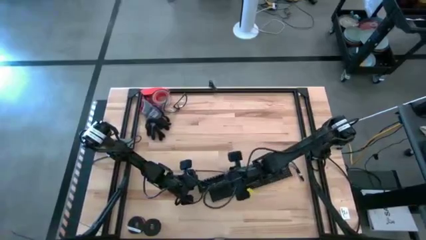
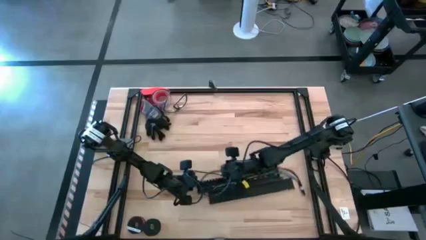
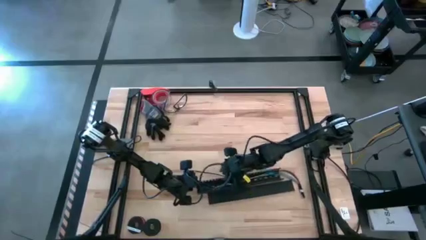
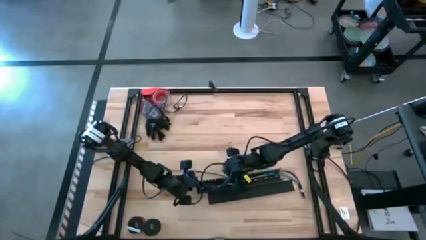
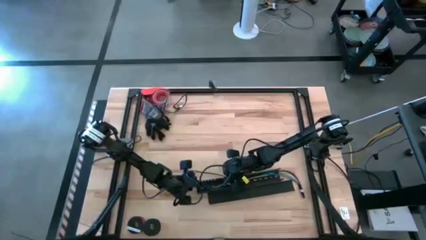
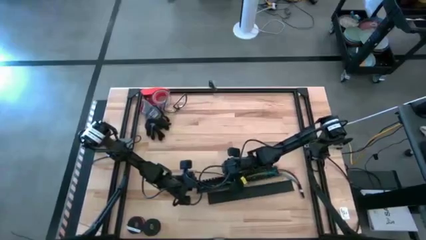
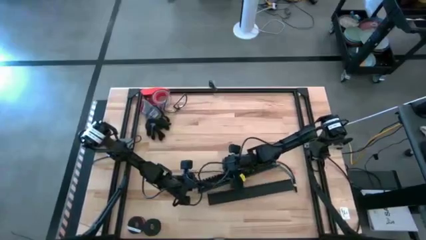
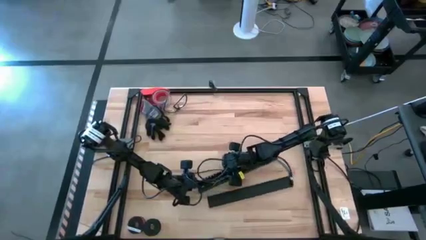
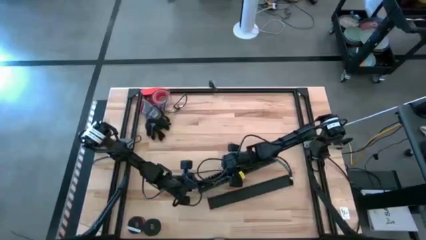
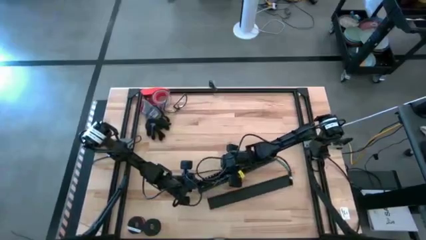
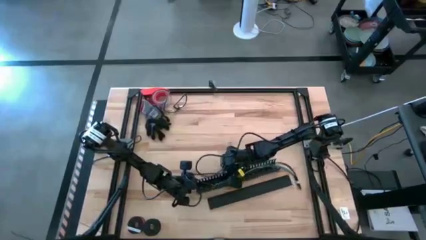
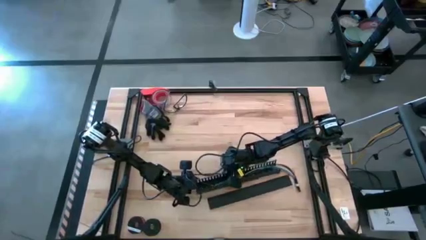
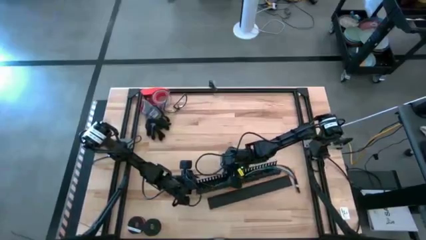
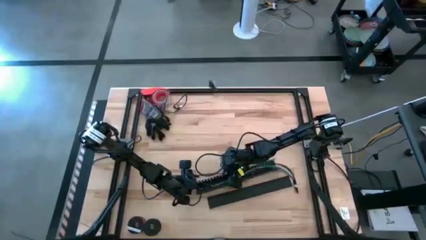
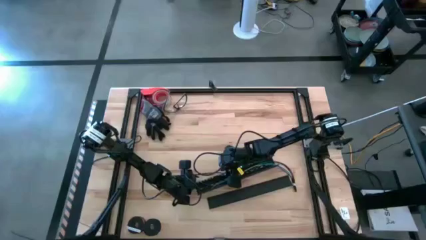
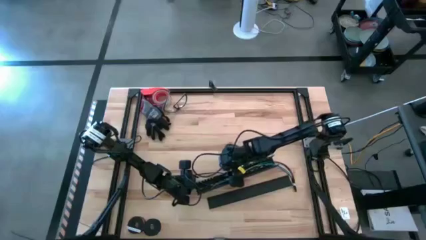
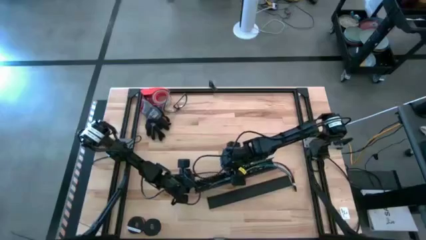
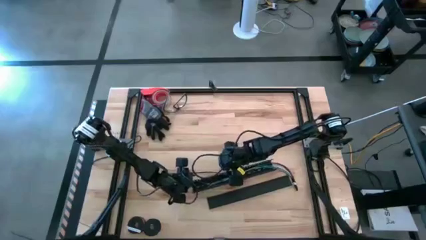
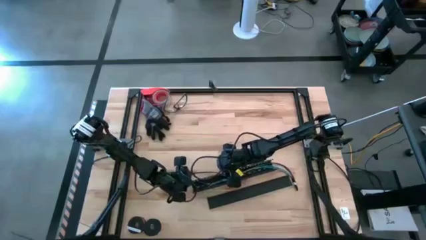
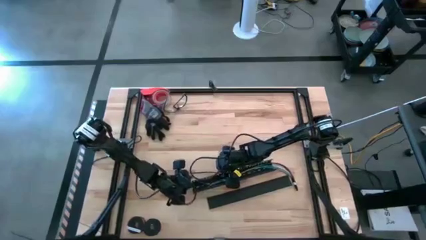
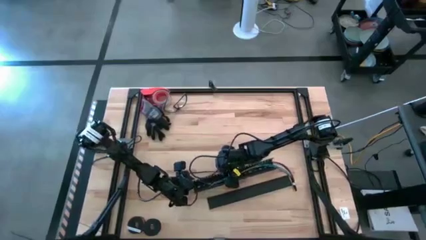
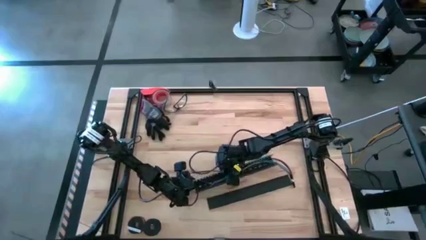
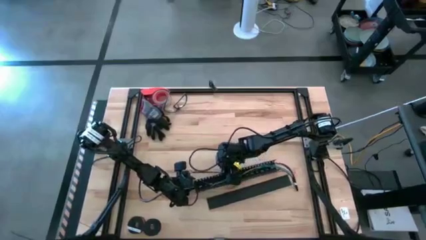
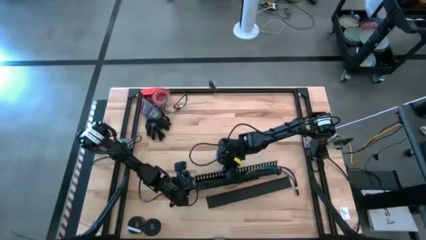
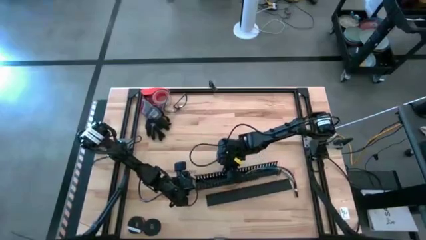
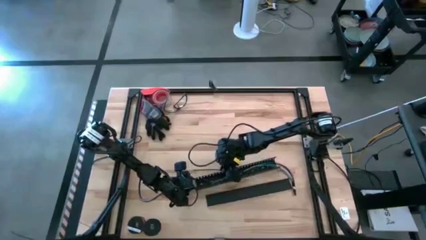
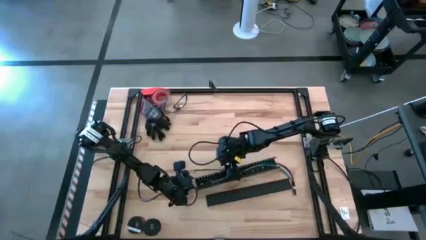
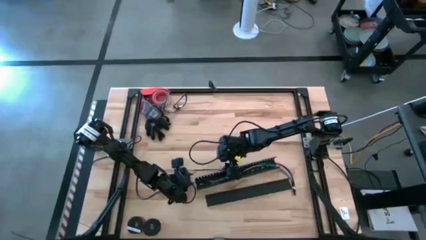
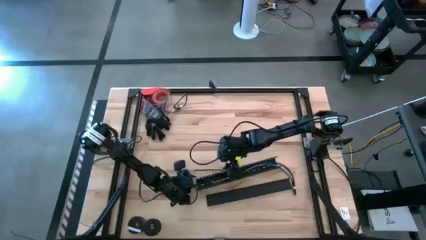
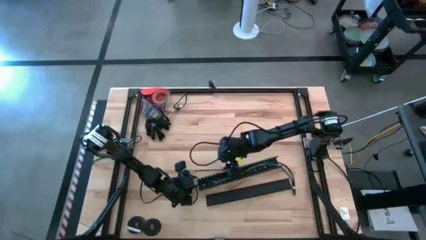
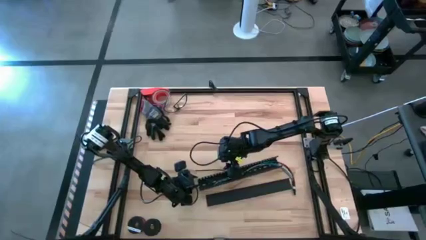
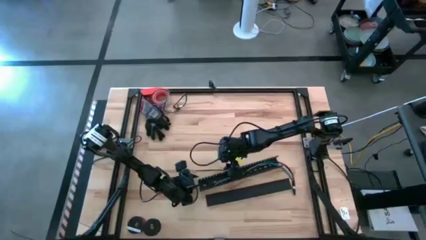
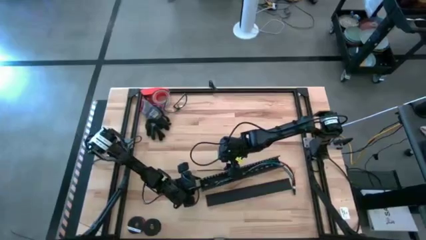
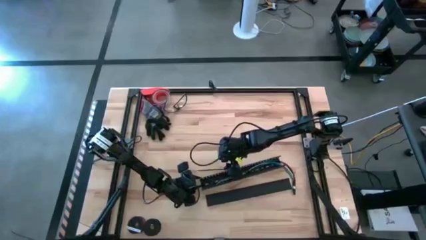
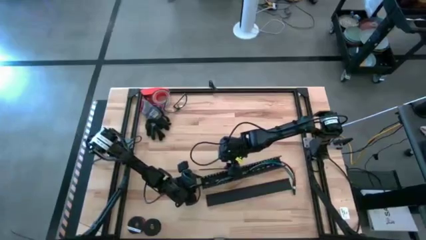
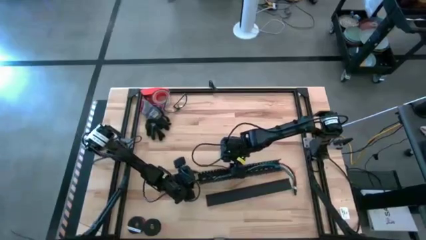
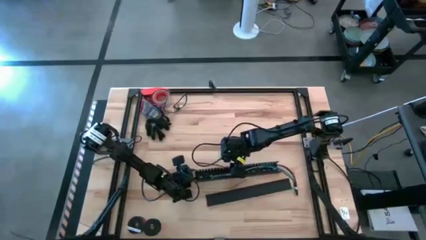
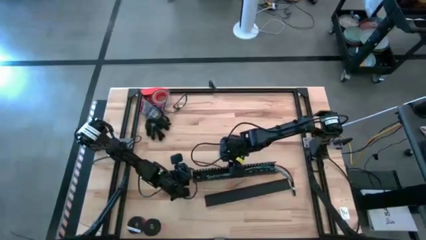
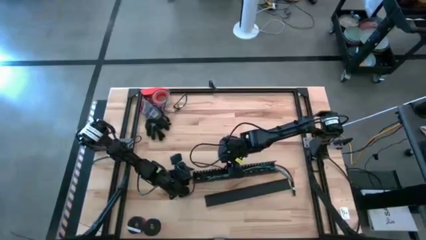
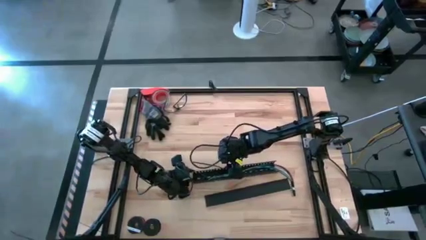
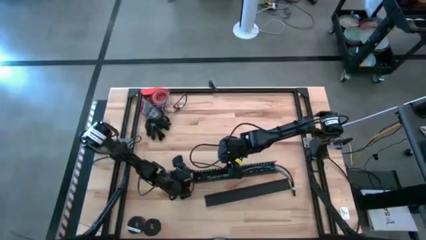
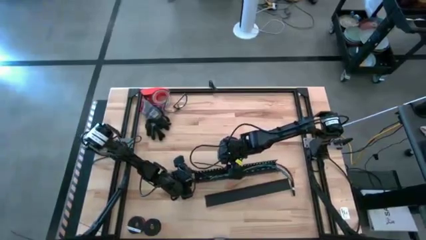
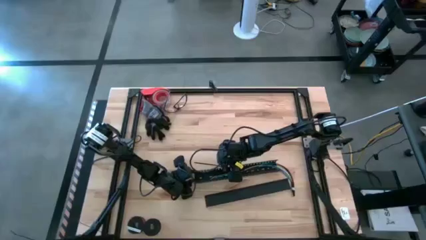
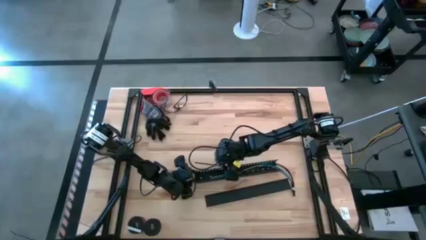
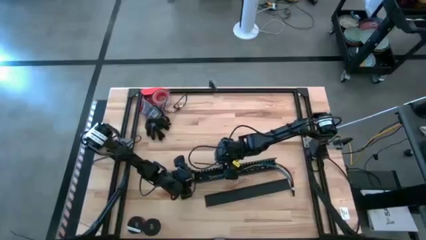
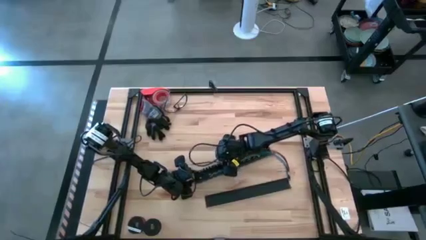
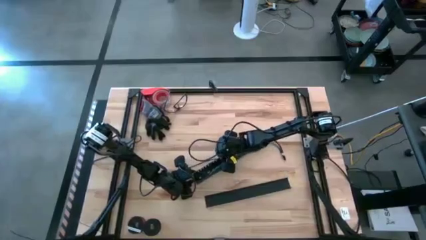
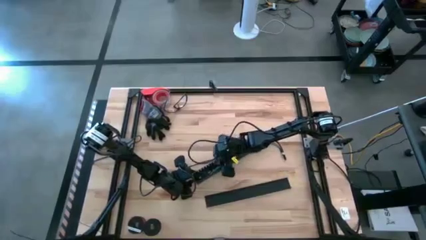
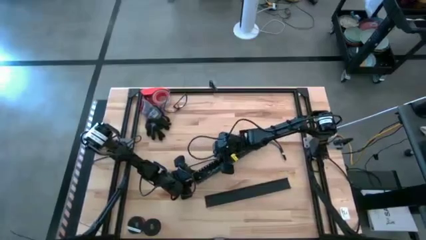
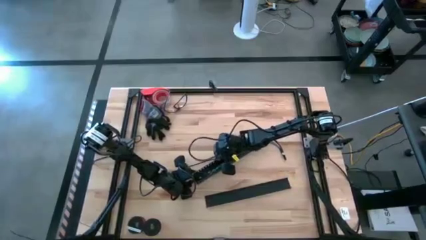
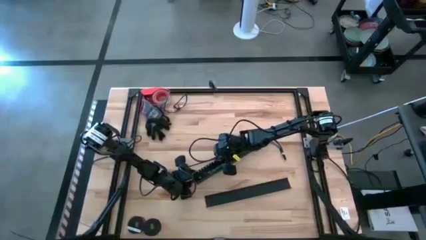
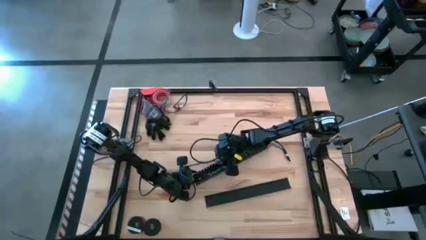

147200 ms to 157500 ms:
Task: Ziptie cables
Put the ziptied cable wires into the black cable duct

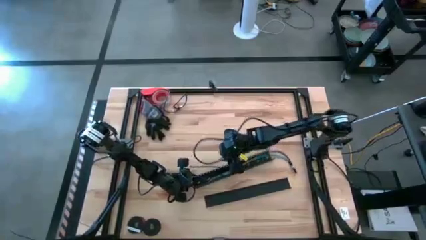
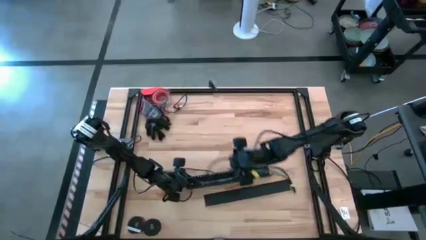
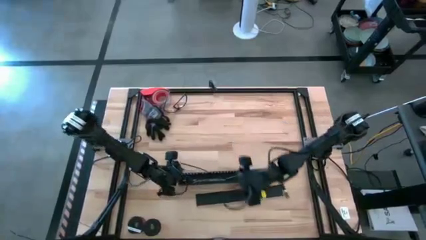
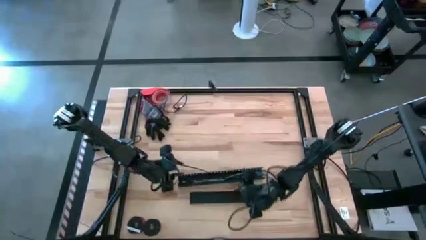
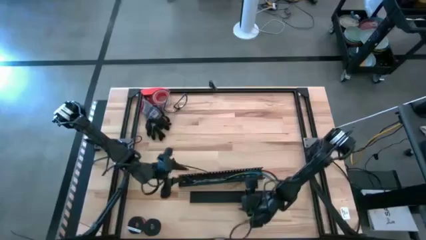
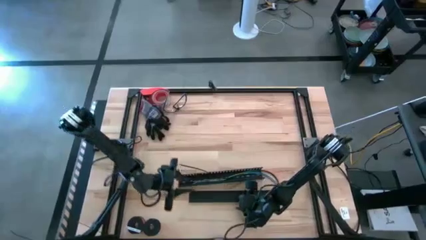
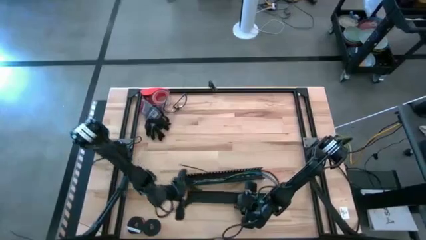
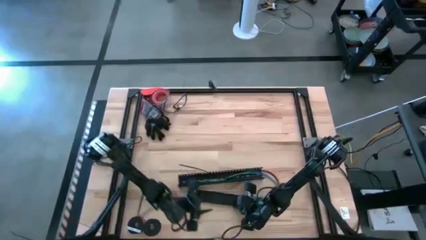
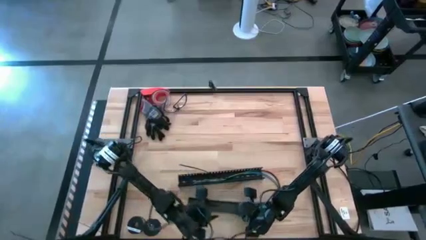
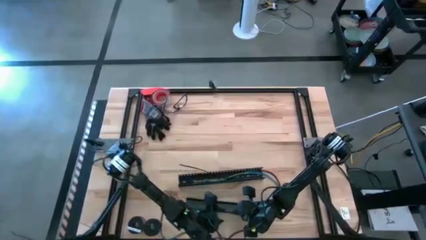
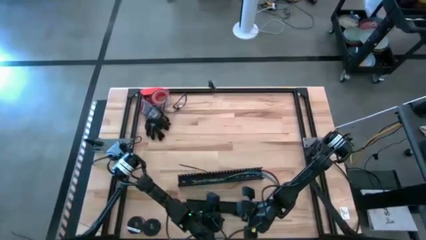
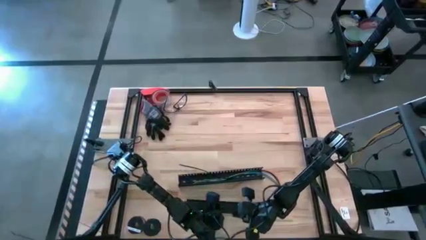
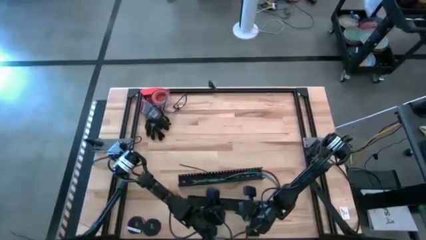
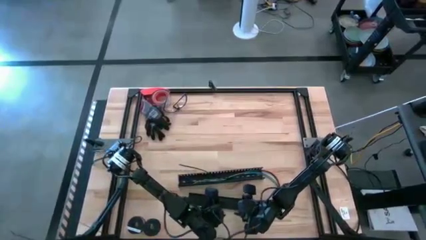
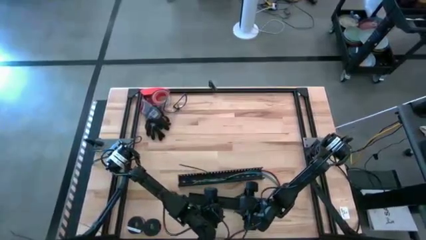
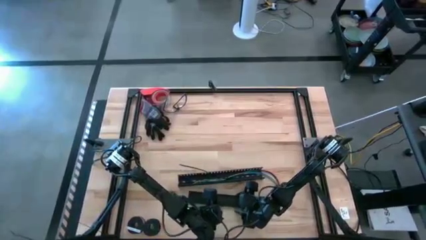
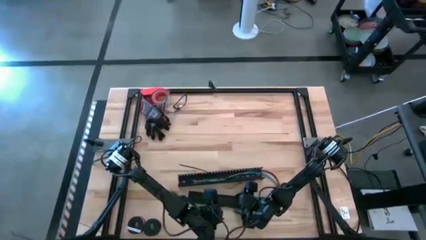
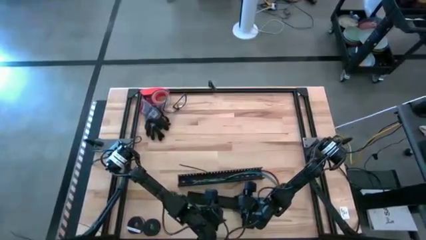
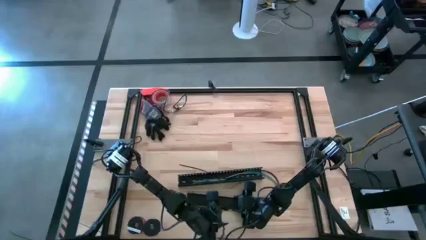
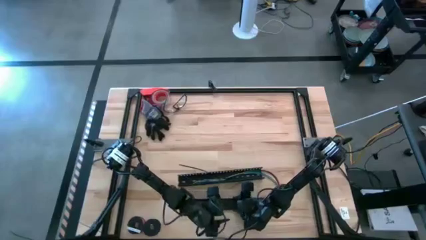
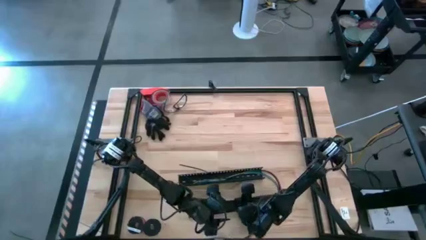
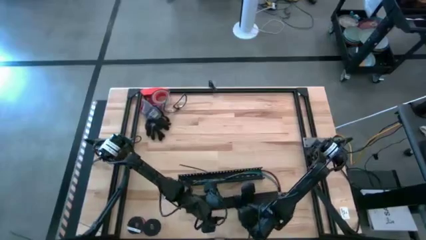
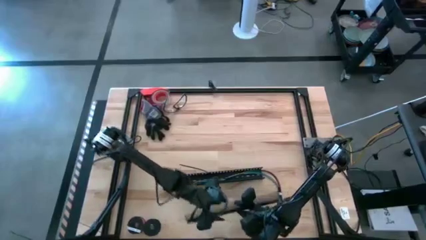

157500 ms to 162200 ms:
Close the black cable duct

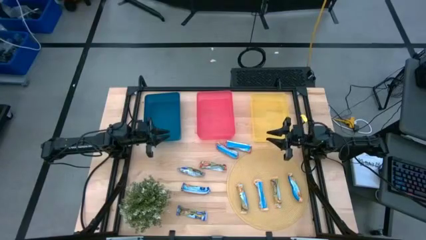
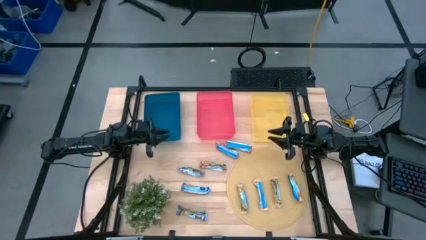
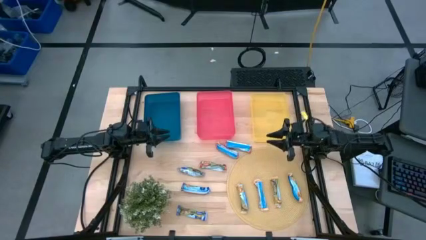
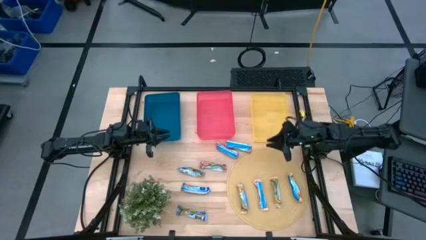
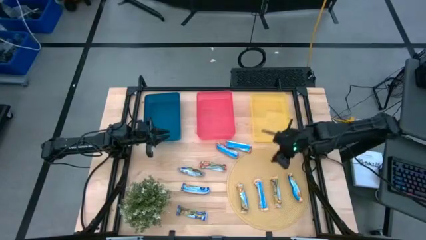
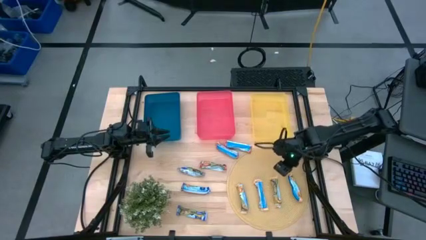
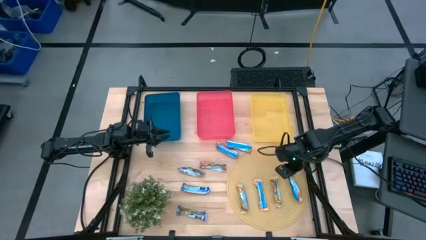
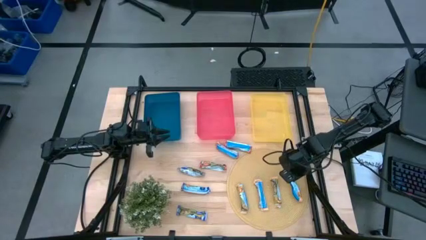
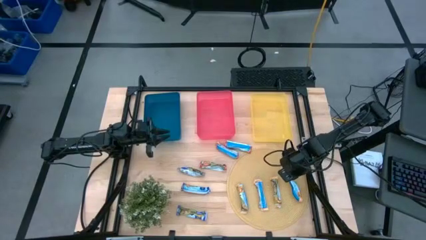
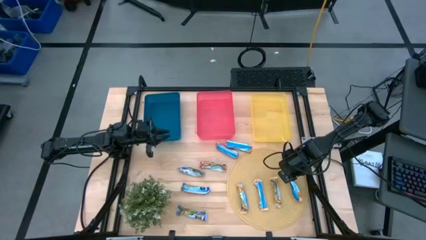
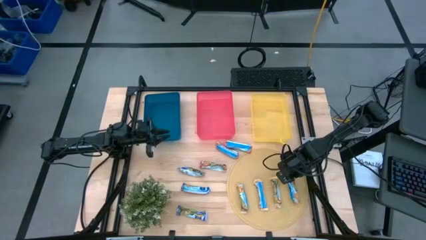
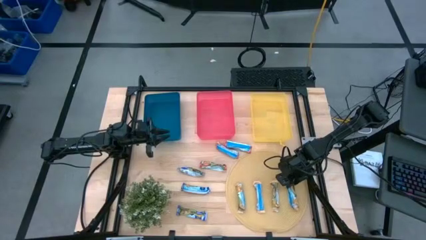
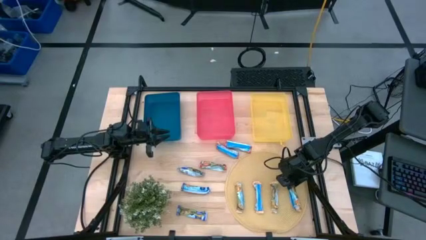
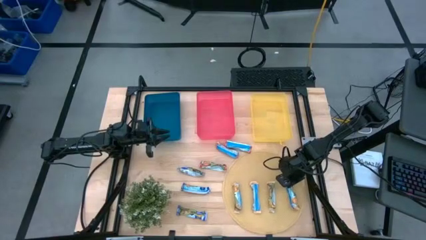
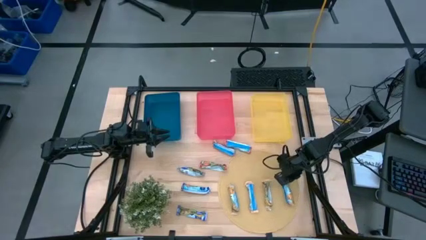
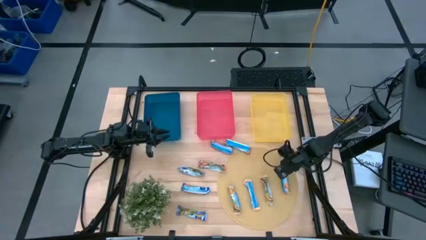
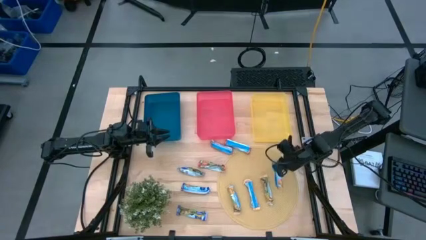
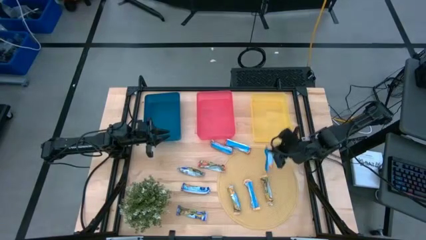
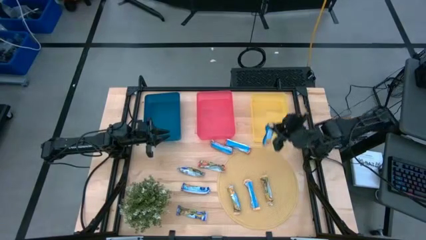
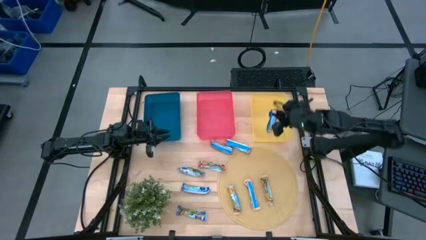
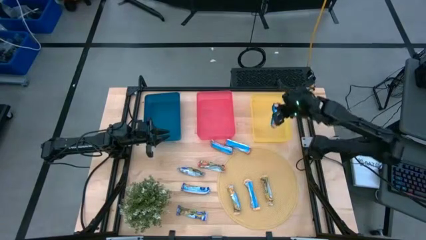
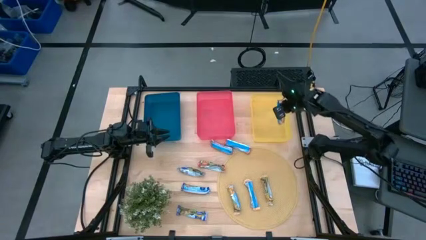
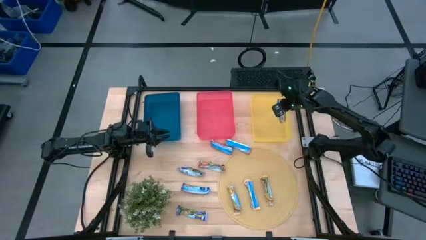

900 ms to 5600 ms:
Task: Pick and place Granola Bars by type
Put the yellow granola bar into the yellow bin
